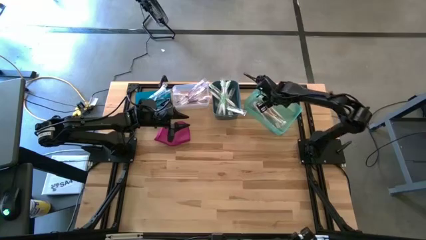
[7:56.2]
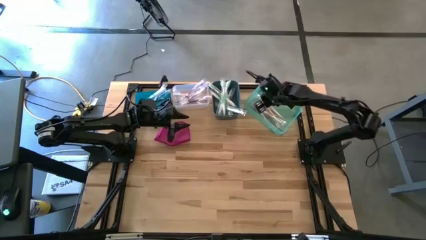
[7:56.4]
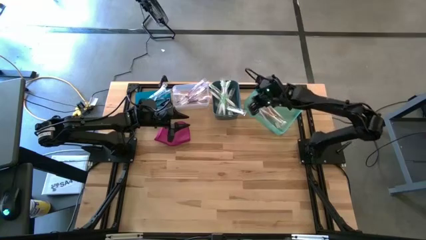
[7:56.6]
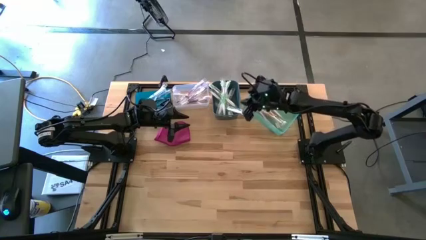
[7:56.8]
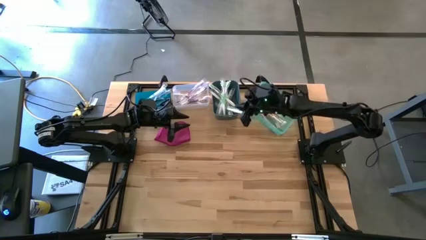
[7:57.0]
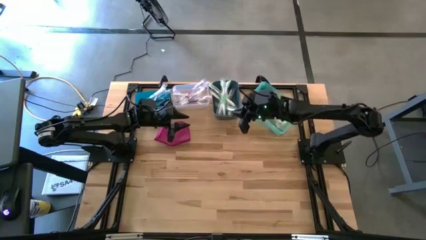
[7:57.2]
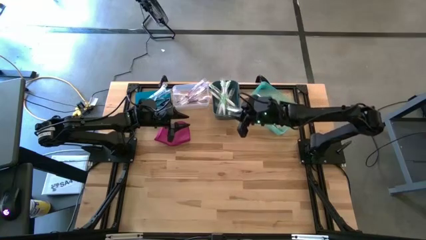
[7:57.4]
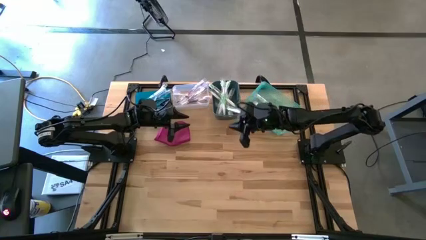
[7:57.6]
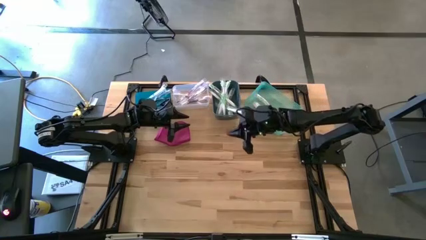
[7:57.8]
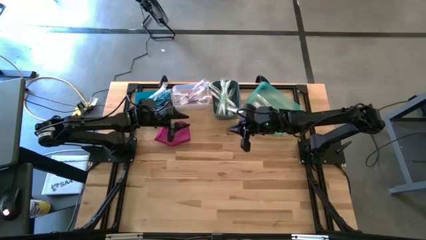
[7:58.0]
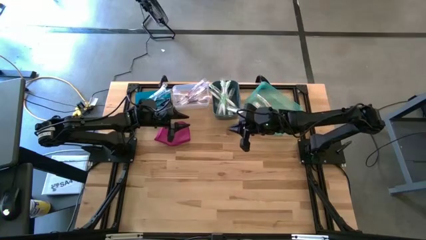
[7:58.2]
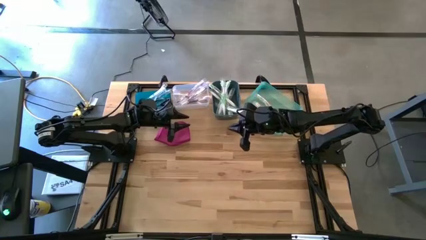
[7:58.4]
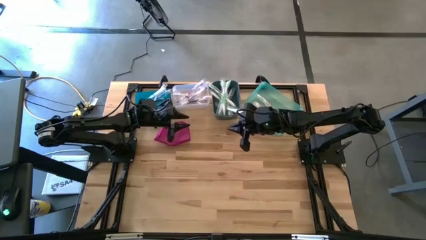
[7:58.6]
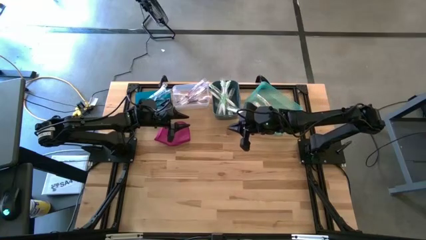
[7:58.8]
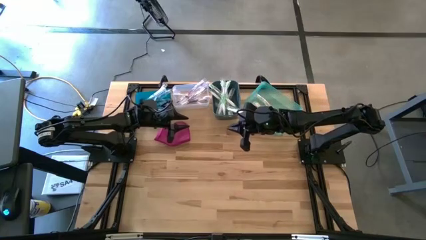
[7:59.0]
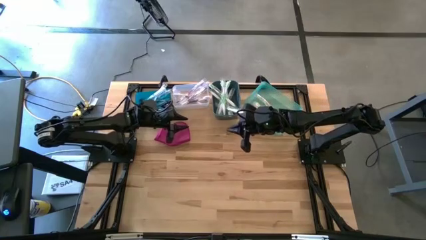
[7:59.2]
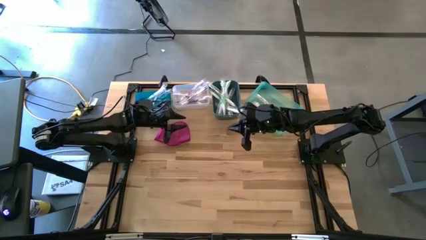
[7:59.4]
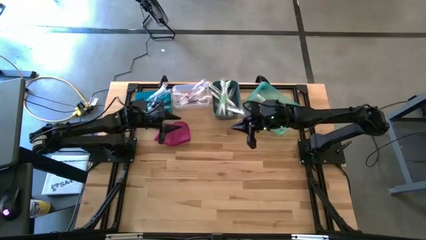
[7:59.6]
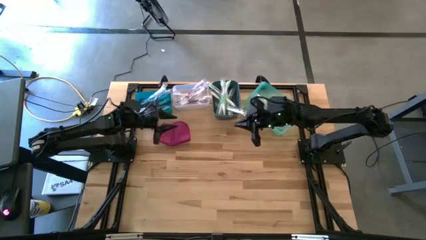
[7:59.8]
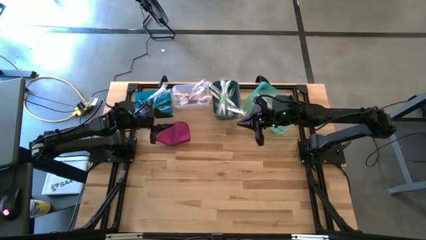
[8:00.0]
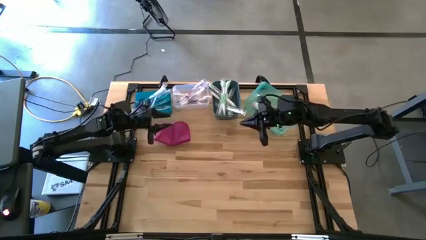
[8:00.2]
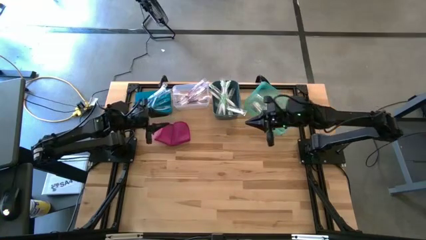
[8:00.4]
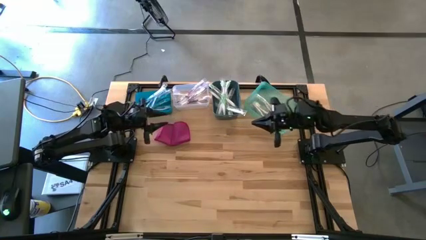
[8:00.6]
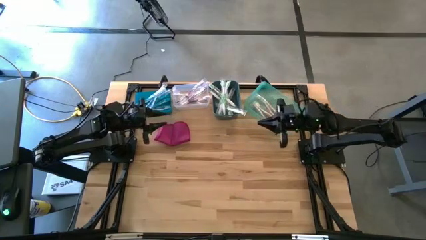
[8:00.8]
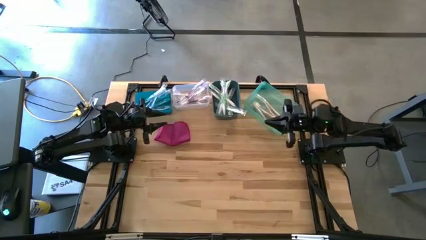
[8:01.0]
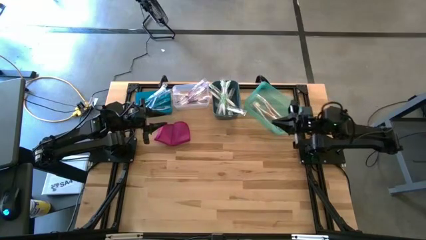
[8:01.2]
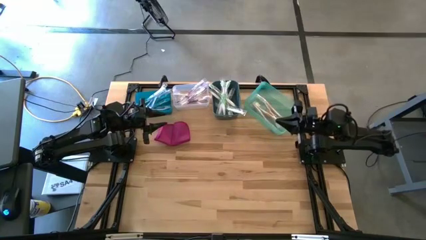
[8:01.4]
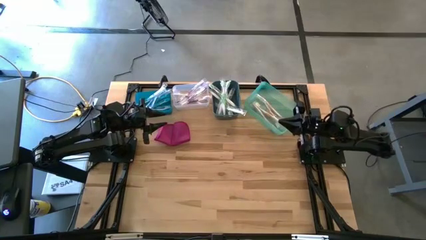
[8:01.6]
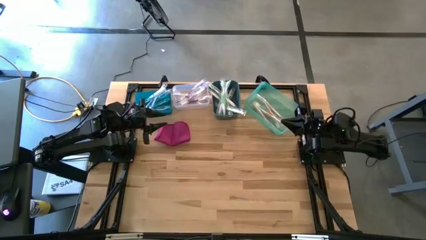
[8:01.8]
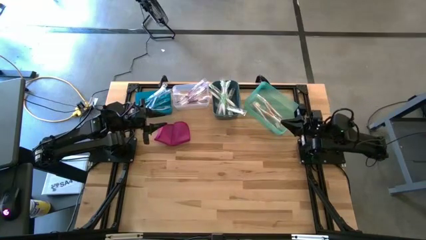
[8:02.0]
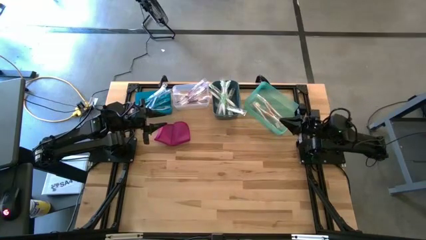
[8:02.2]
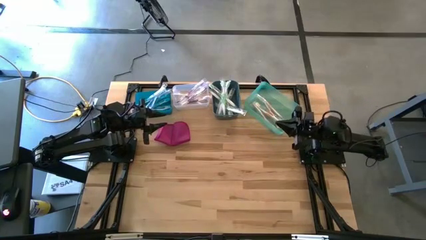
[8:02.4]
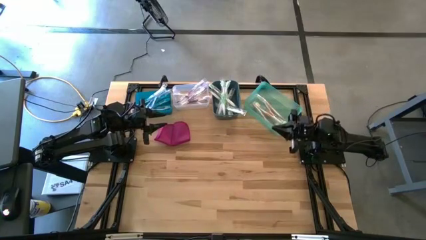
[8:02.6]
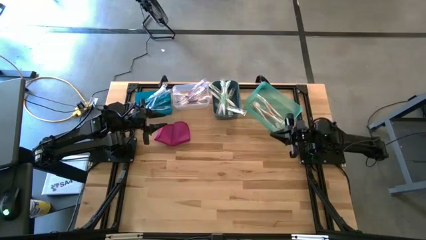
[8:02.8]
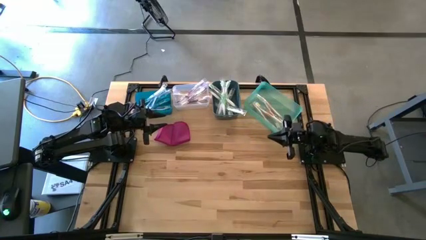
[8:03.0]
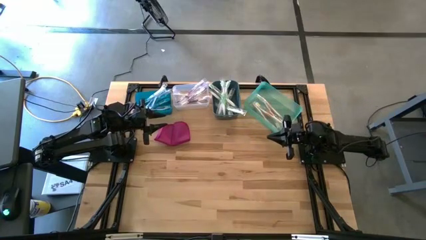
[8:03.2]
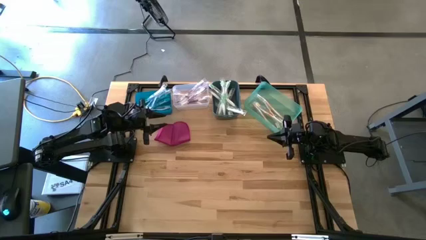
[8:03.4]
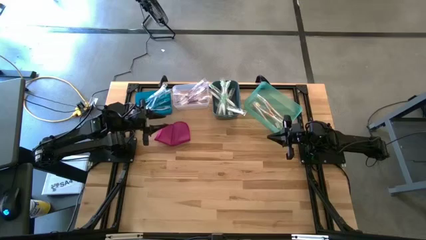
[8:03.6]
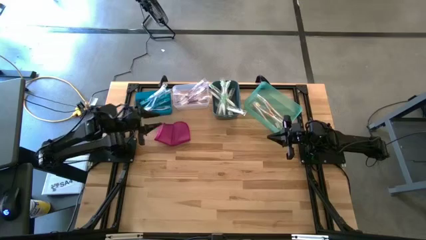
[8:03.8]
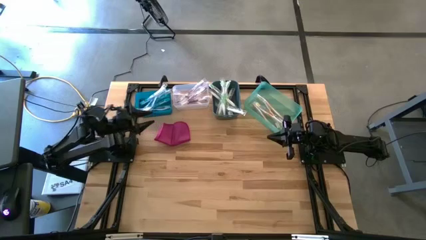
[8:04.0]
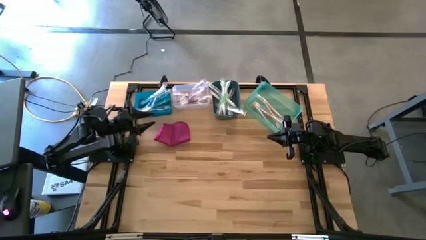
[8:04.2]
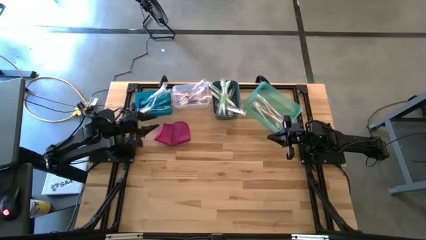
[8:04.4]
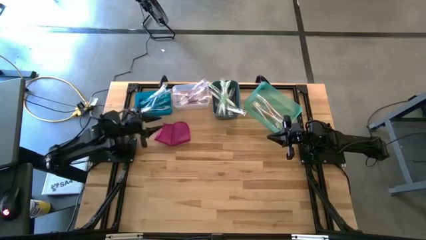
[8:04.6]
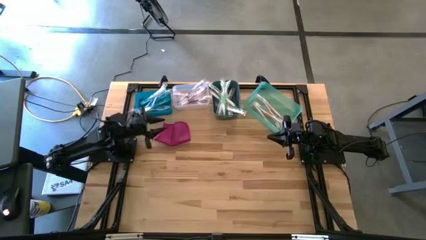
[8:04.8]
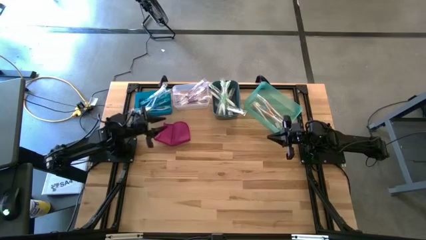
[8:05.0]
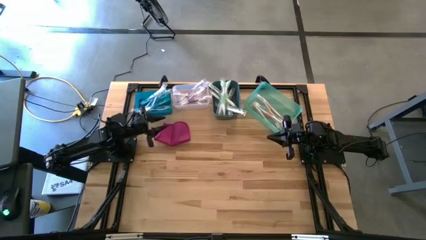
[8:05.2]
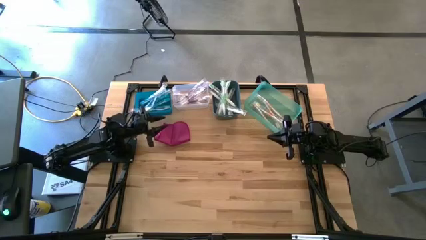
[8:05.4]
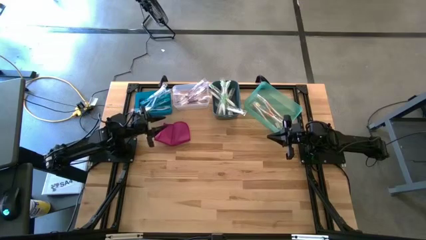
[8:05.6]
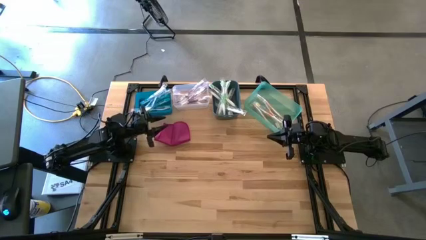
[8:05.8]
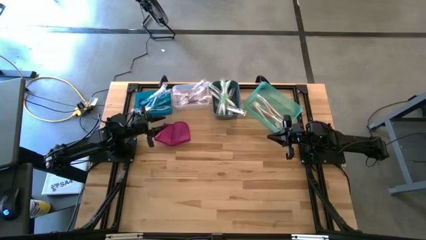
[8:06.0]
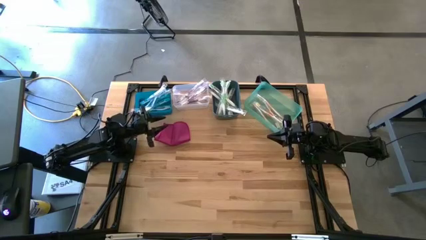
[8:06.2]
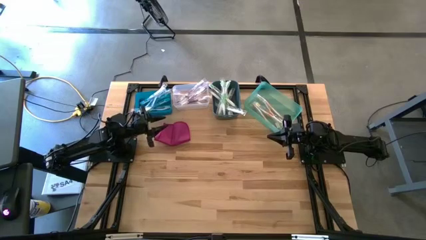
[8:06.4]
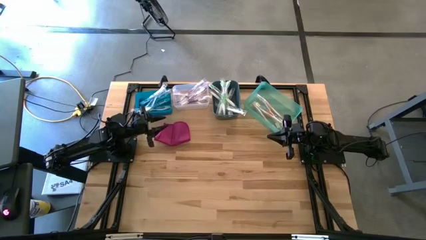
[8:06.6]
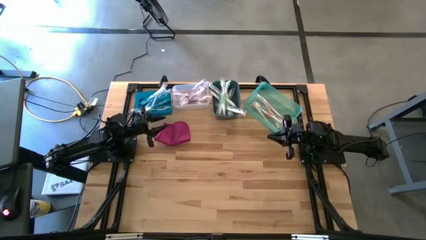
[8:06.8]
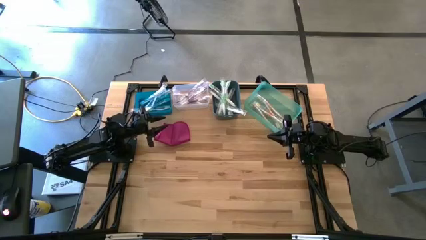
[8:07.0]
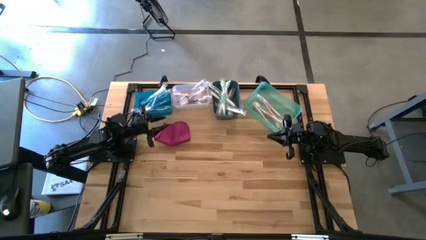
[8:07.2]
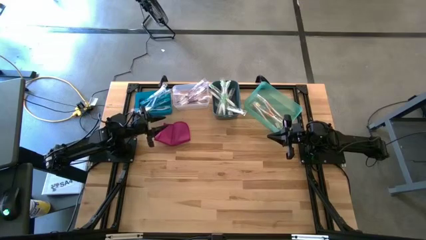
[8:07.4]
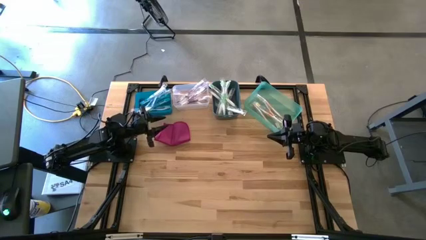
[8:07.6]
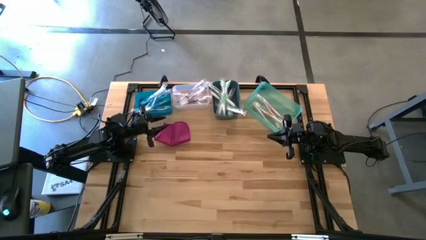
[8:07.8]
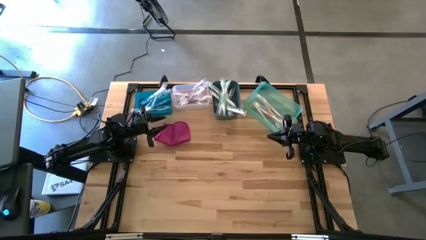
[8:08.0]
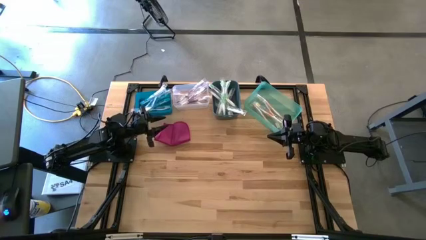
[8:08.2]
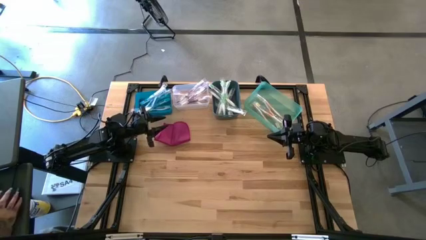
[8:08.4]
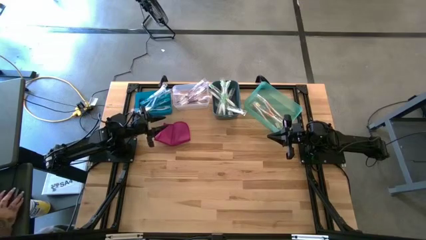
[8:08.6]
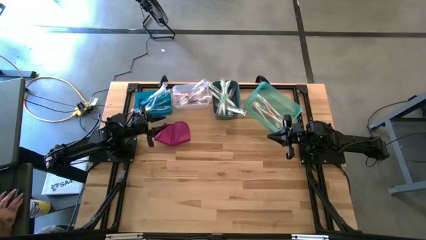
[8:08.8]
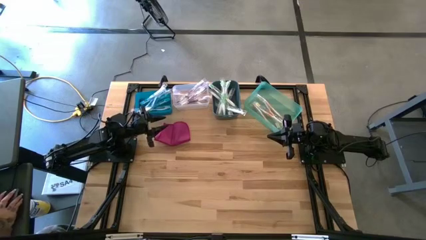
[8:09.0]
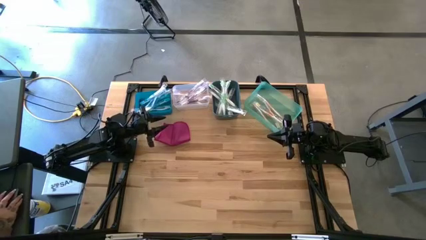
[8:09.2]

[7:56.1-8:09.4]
Task: Pick & Place Toothbrushes
Return to Home Position

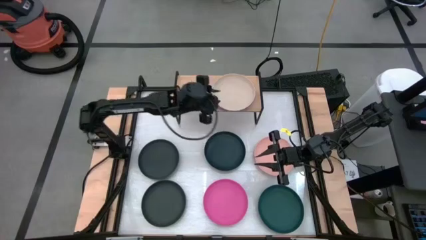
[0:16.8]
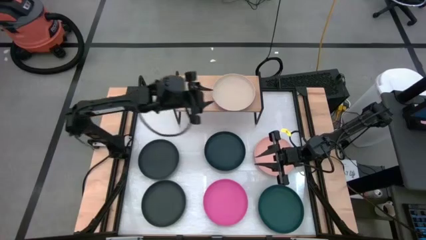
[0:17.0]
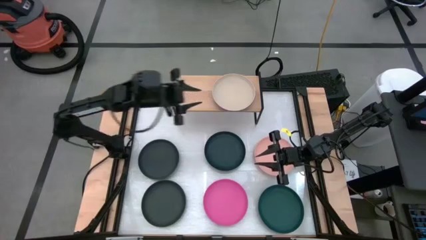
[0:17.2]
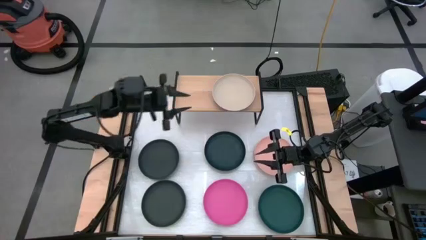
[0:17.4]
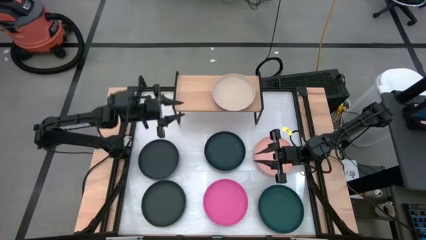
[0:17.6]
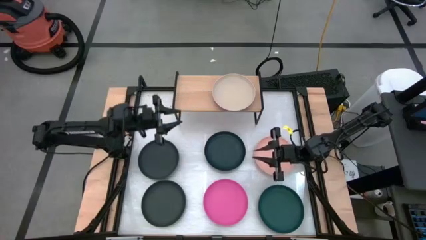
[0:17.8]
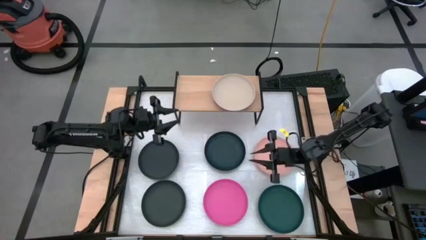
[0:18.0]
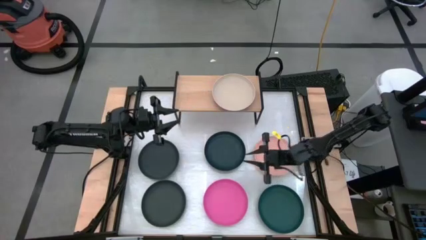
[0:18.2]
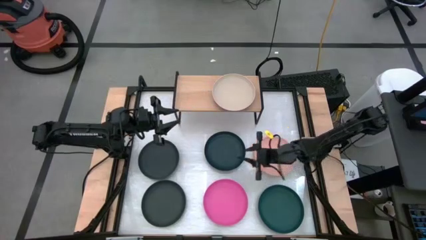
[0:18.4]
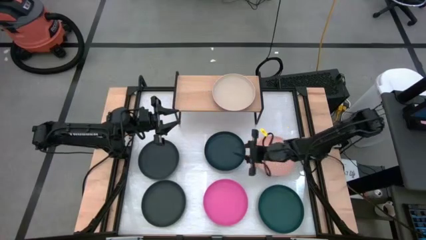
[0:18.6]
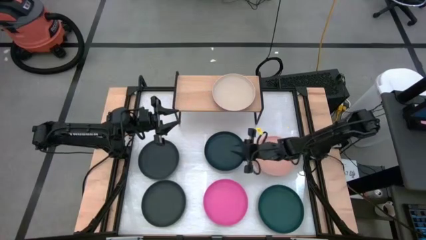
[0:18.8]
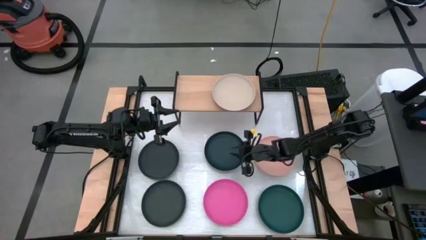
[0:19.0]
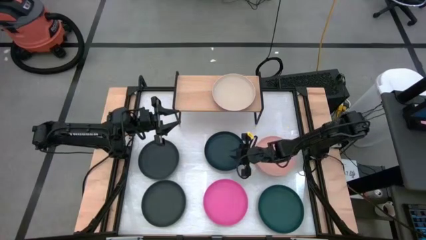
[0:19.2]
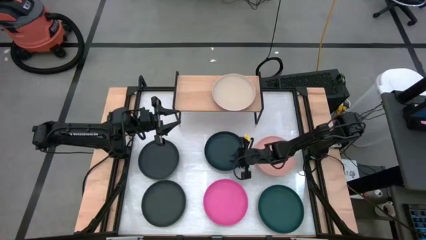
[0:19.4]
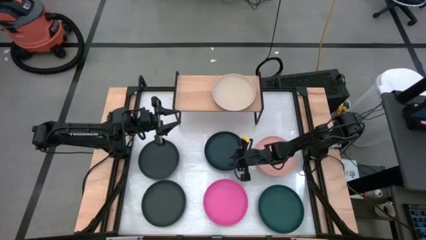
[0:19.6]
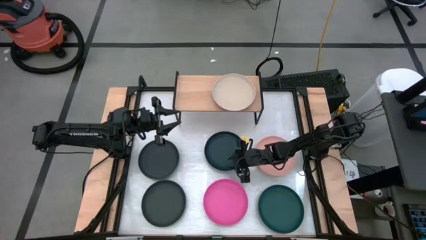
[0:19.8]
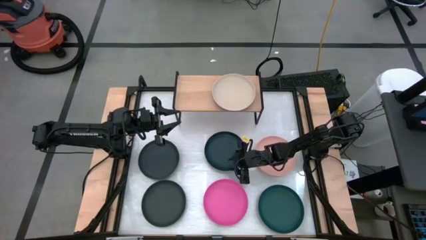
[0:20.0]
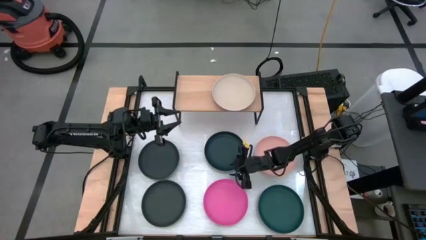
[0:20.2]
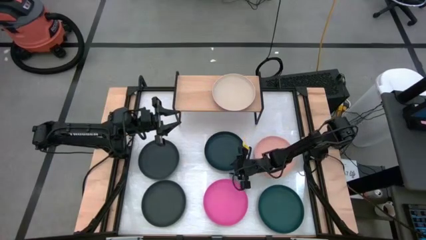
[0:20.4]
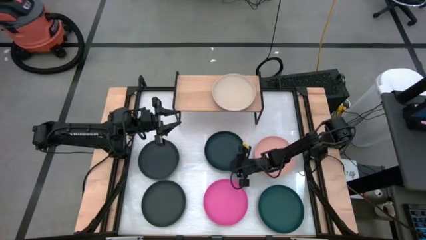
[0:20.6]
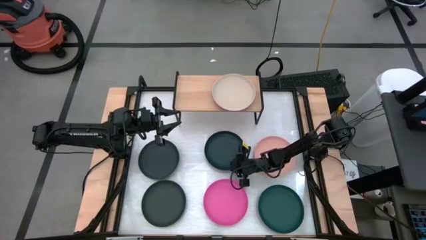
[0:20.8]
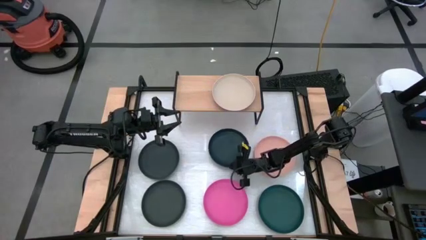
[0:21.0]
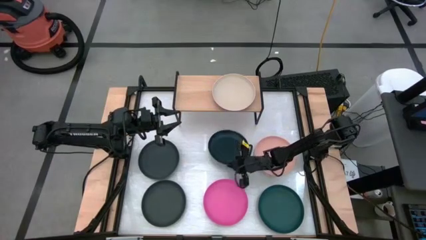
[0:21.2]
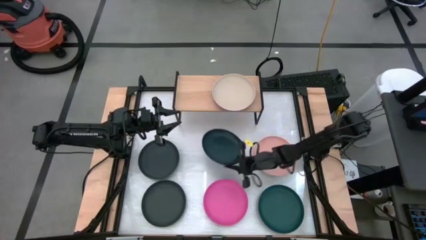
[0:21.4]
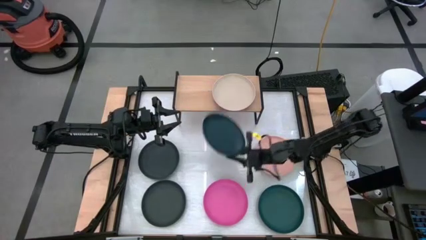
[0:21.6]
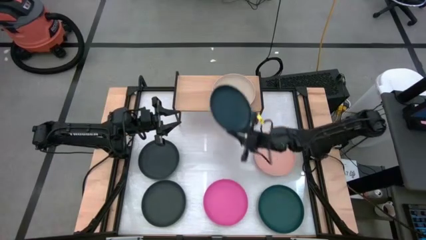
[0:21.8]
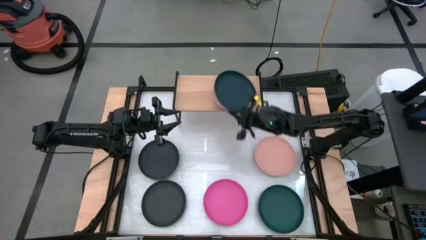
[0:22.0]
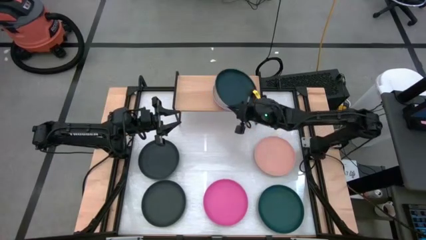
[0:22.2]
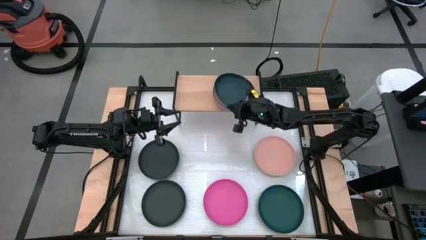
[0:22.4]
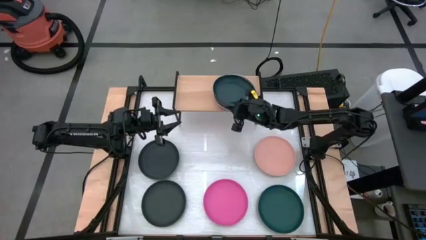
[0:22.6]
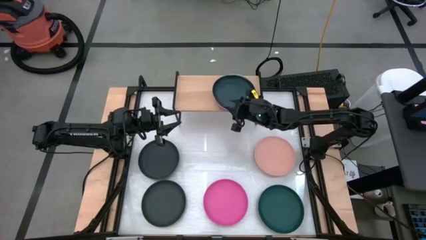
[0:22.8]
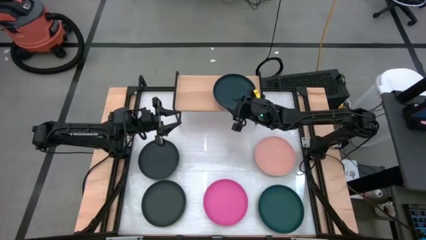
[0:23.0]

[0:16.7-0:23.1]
Task: Place and stack plates onto a shelf
Stack the top dark green plate on top of the light brown plate on top of the shelf
